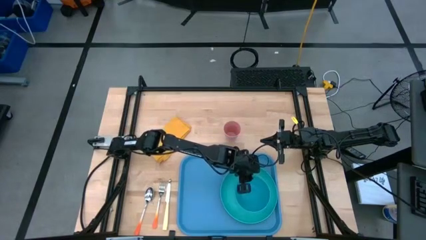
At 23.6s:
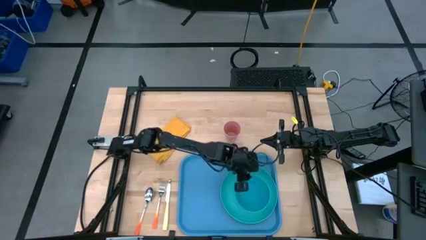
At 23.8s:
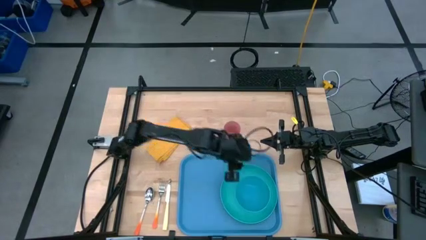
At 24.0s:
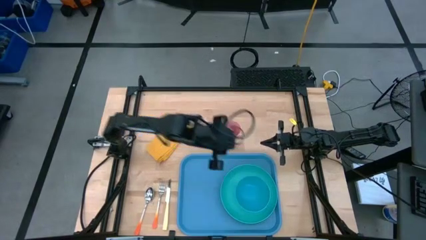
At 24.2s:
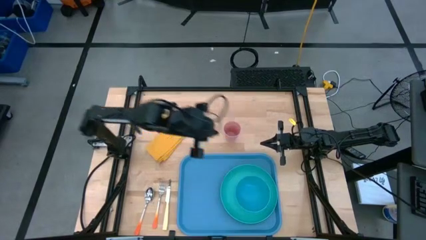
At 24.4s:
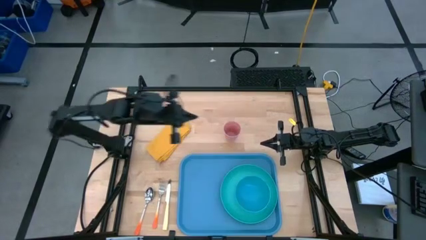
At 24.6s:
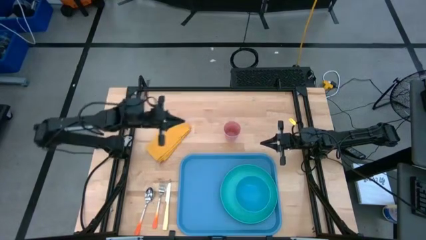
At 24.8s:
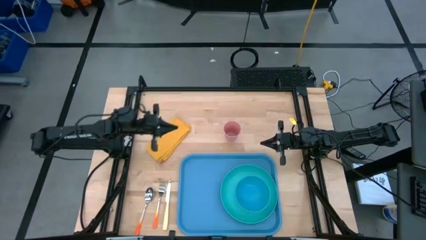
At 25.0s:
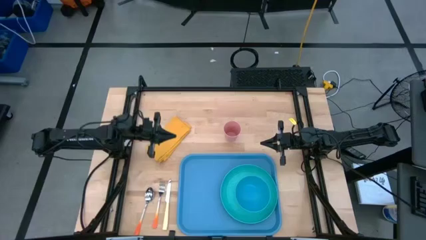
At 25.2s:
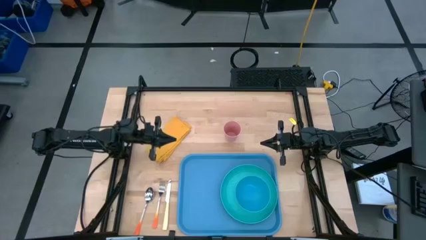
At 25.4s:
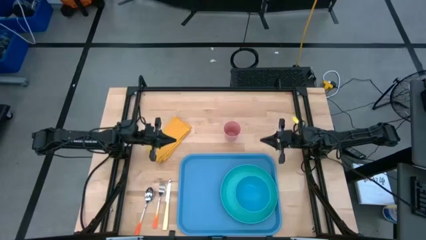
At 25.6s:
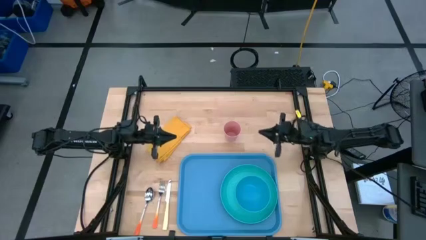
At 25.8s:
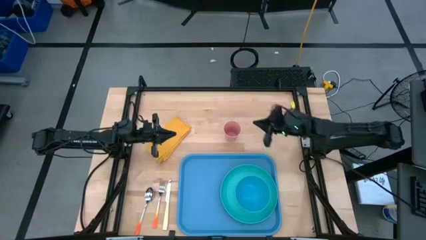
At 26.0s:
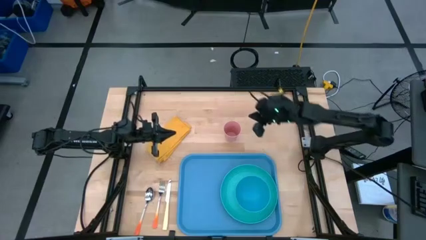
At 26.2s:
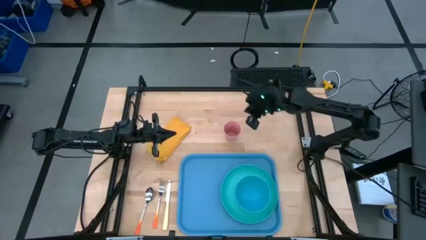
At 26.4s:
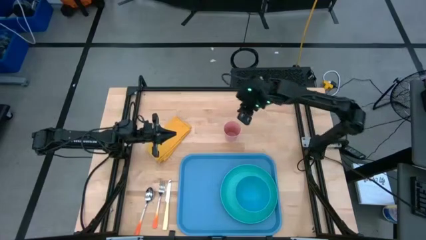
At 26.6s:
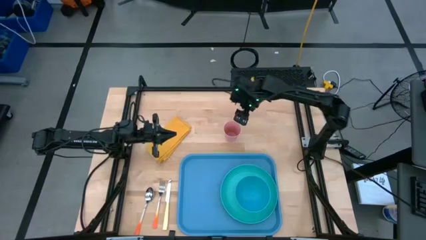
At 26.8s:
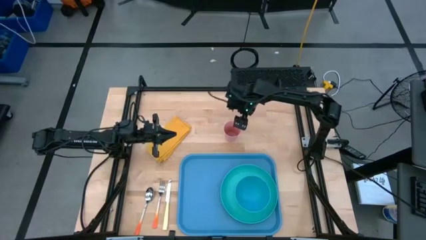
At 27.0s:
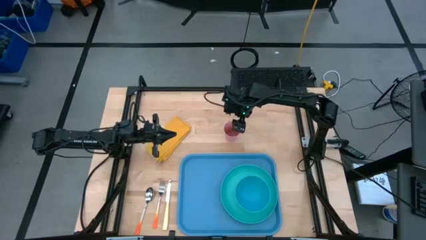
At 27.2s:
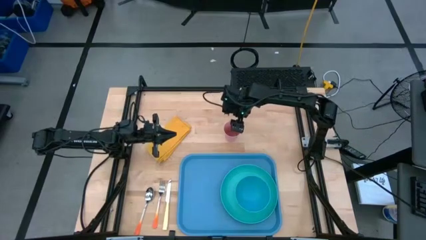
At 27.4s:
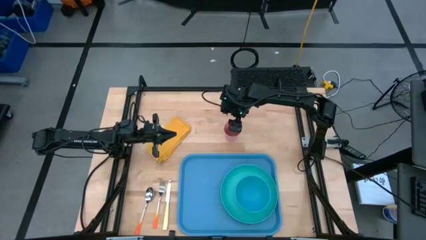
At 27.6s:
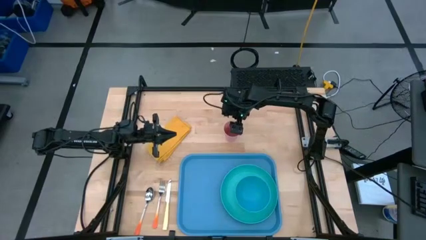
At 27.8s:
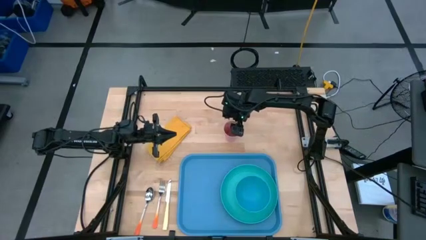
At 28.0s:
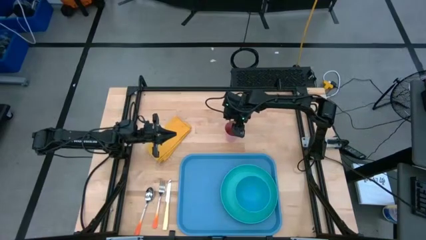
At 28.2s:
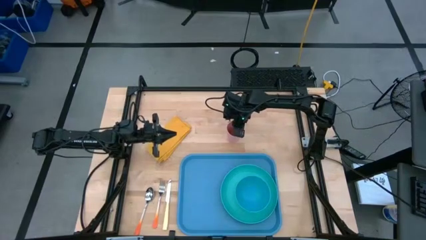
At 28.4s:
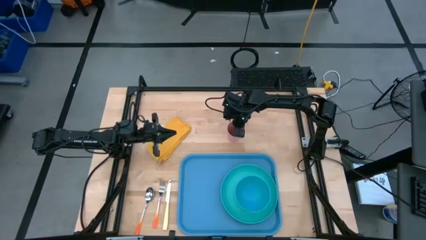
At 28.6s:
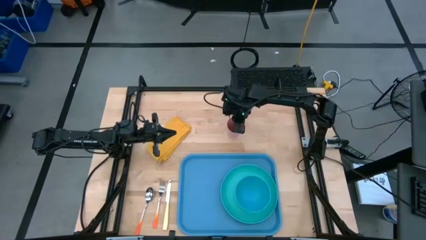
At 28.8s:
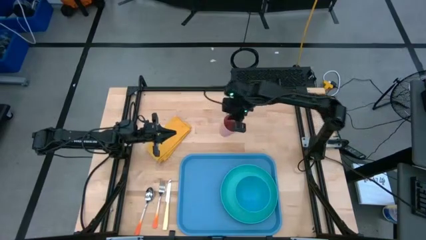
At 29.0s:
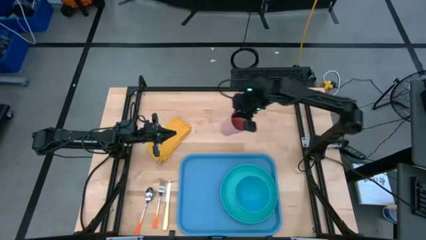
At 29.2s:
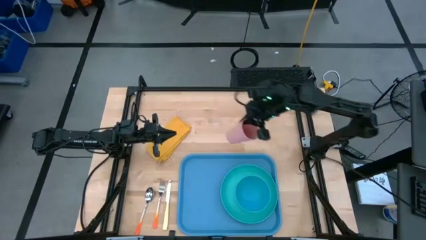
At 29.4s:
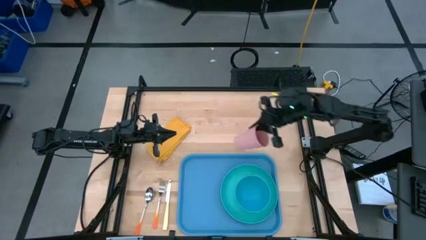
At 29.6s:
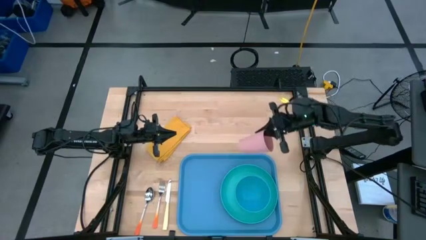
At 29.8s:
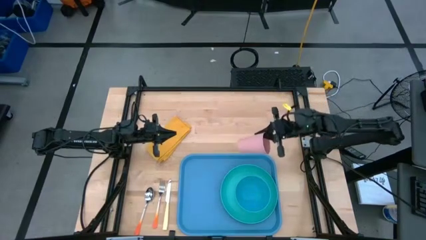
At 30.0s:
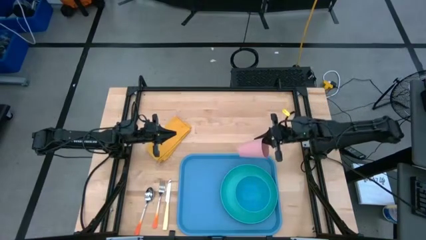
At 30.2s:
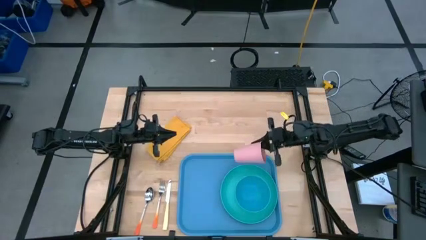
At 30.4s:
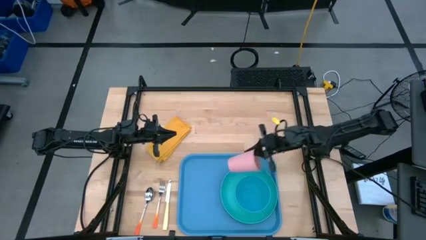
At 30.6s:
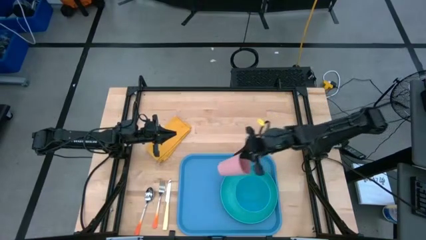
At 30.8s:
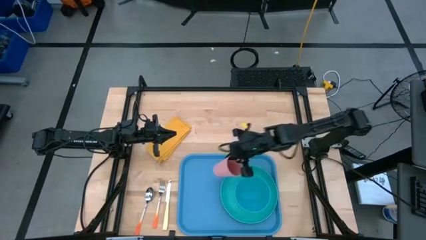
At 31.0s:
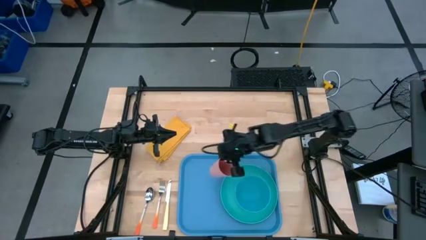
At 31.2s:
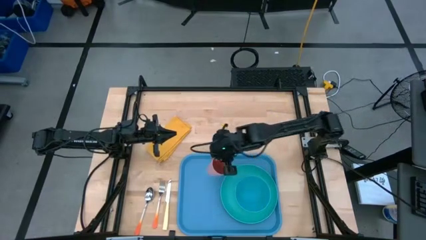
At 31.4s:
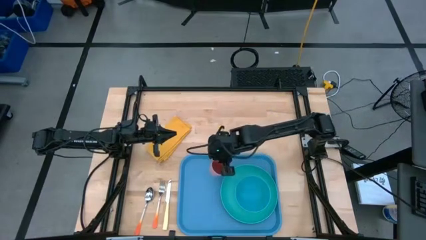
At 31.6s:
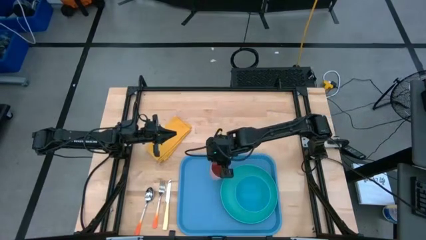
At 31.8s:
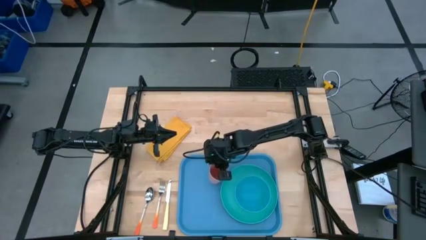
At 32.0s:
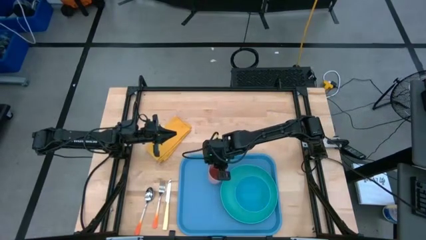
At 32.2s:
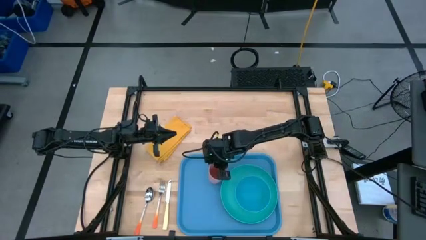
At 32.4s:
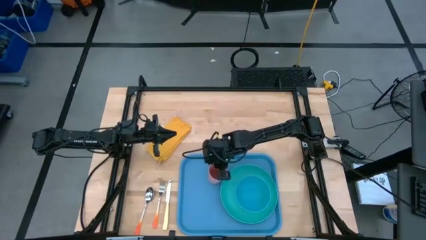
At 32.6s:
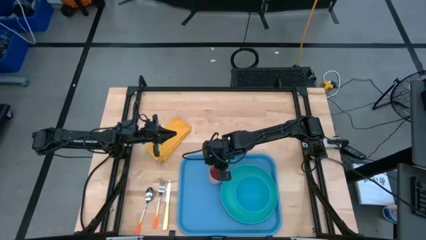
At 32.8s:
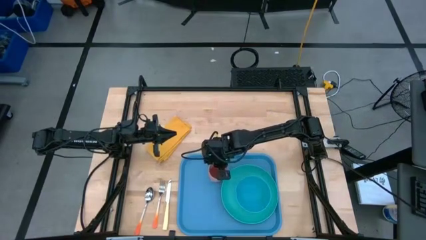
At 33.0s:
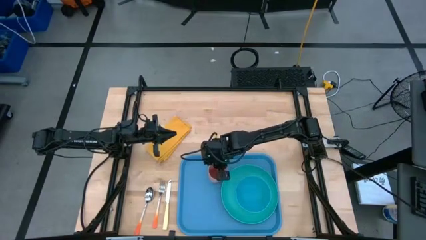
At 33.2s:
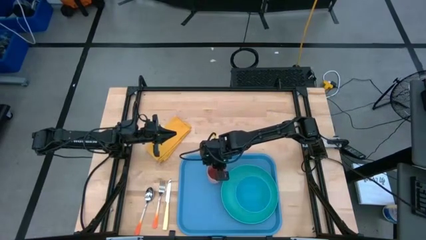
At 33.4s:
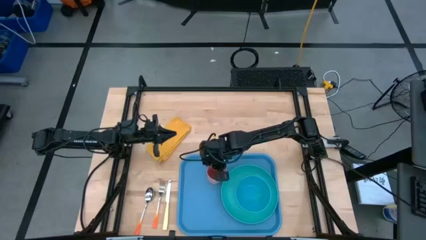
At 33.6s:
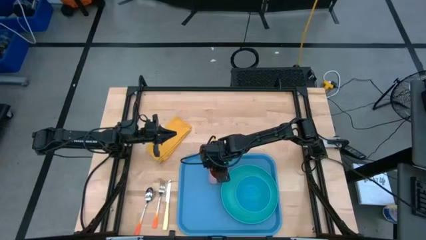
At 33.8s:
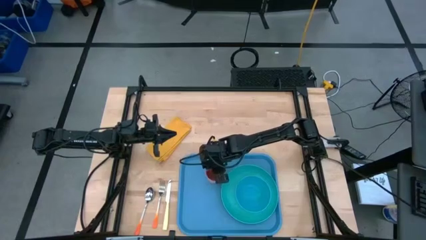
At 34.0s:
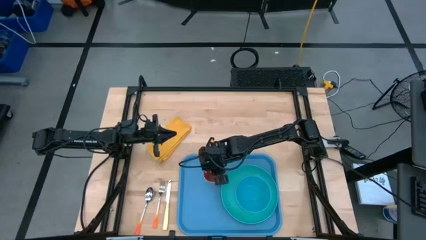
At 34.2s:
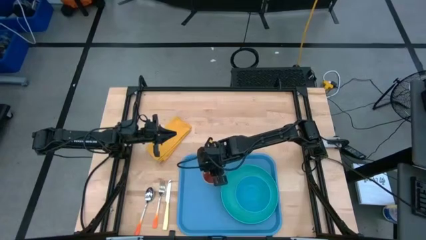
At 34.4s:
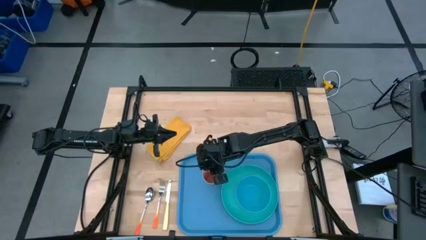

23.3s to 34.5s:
Task: Set up tray
Put the pink cup on the blue serving tray to the top left of the green plate

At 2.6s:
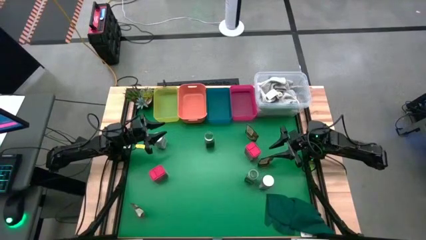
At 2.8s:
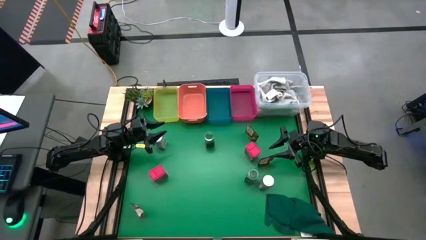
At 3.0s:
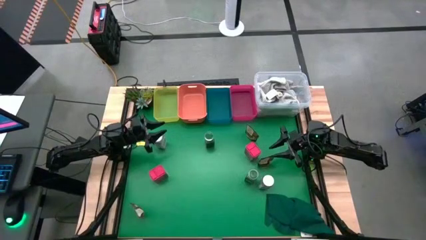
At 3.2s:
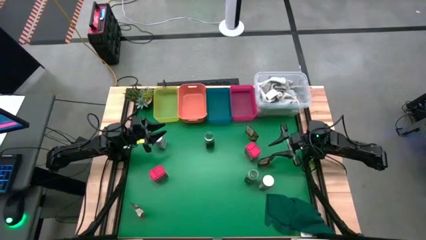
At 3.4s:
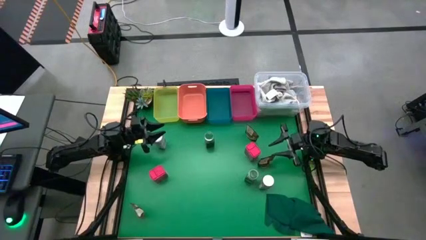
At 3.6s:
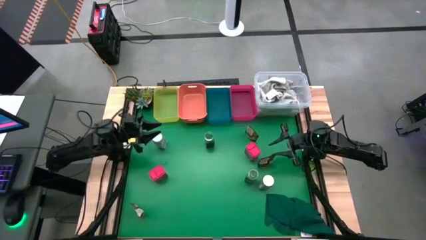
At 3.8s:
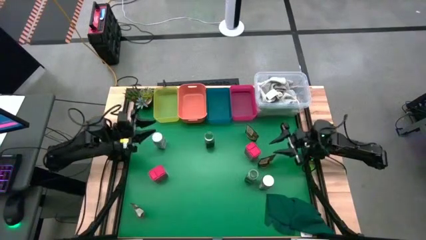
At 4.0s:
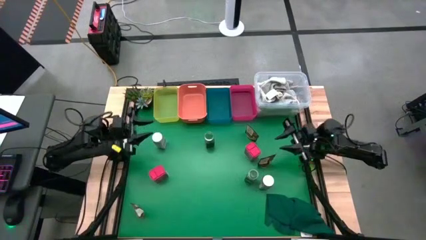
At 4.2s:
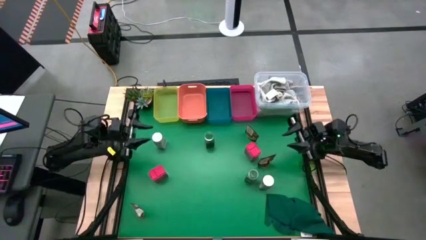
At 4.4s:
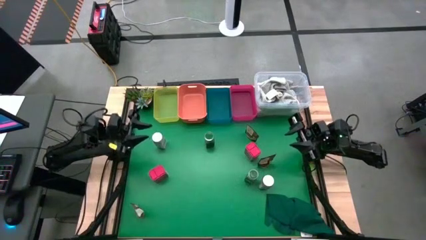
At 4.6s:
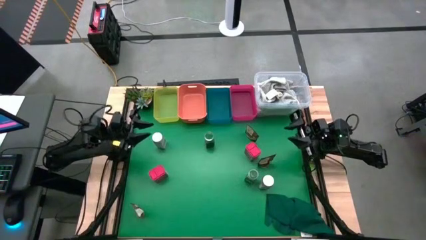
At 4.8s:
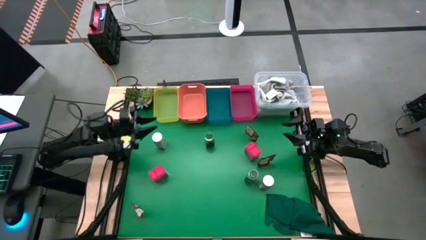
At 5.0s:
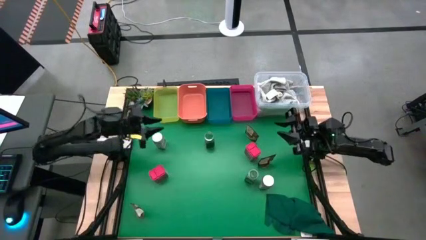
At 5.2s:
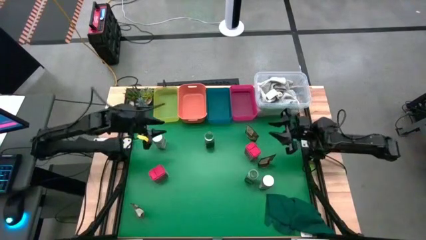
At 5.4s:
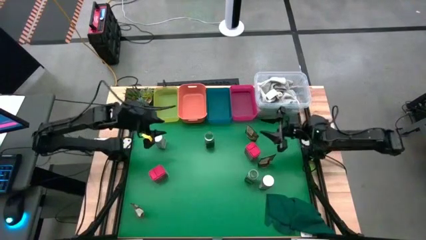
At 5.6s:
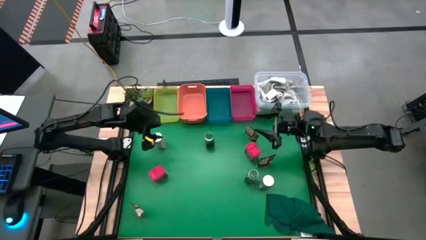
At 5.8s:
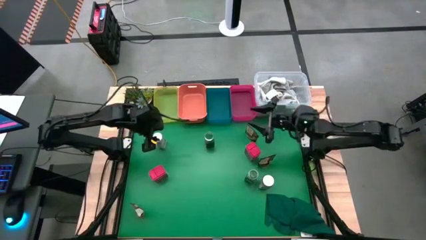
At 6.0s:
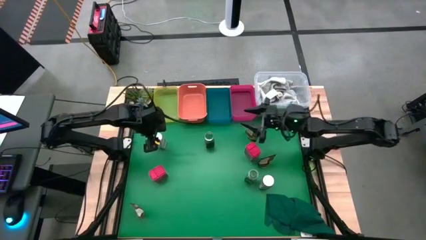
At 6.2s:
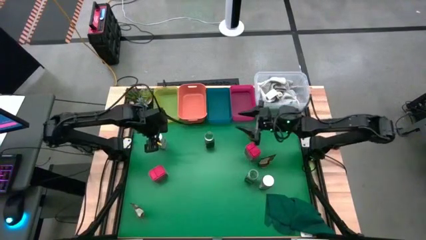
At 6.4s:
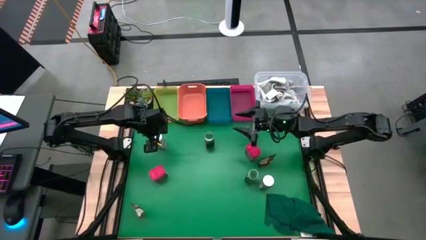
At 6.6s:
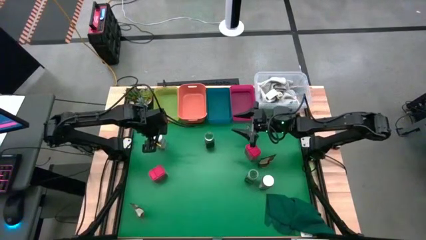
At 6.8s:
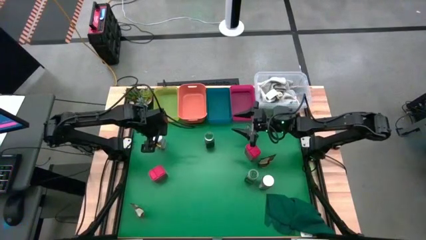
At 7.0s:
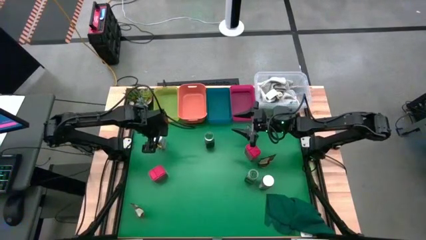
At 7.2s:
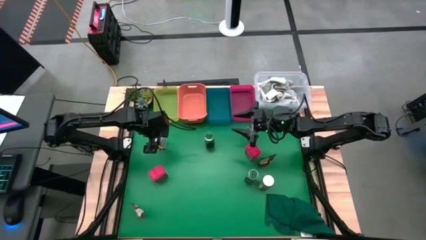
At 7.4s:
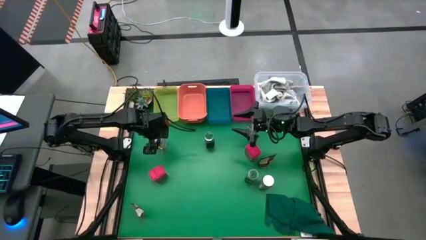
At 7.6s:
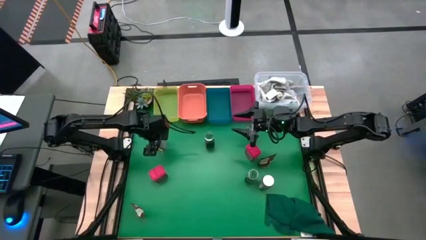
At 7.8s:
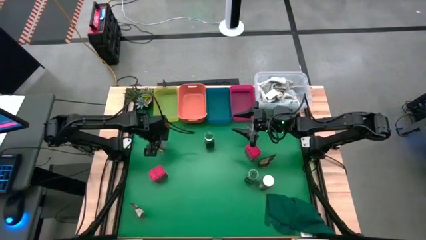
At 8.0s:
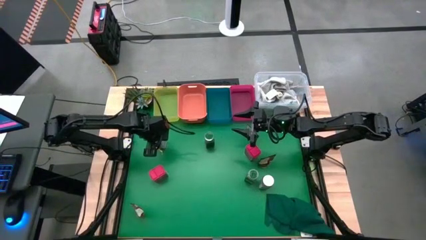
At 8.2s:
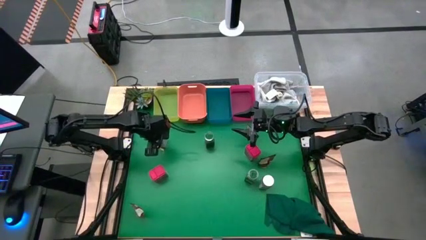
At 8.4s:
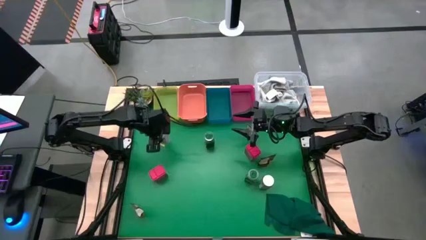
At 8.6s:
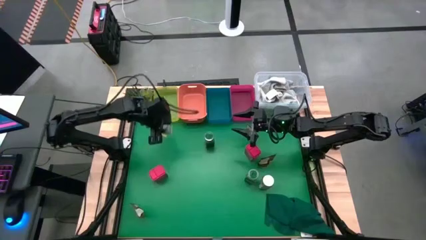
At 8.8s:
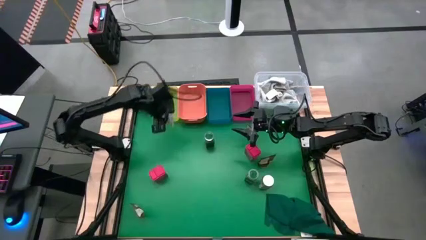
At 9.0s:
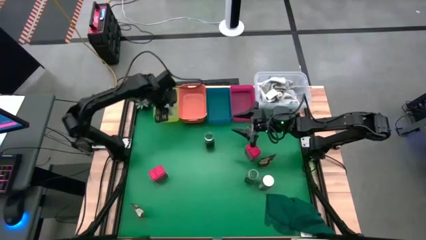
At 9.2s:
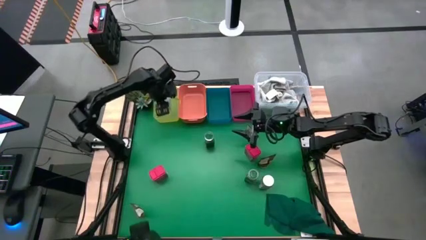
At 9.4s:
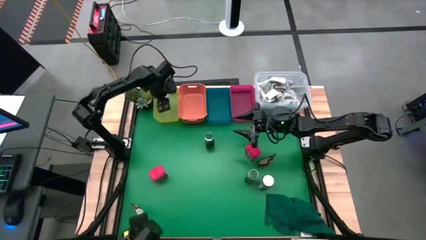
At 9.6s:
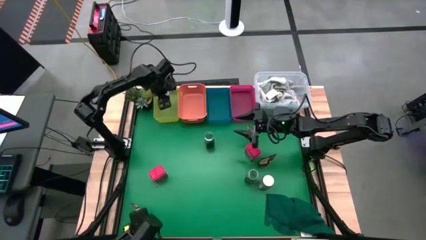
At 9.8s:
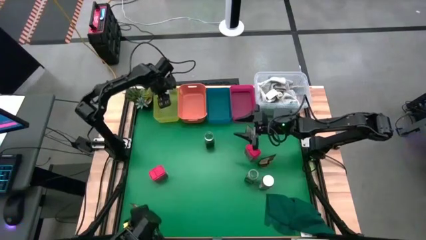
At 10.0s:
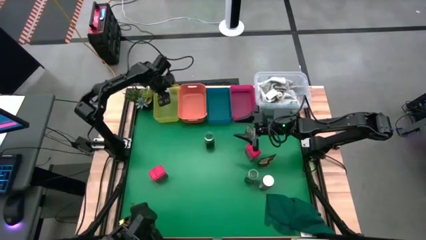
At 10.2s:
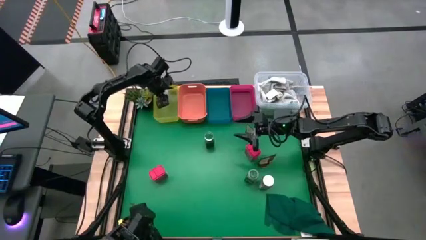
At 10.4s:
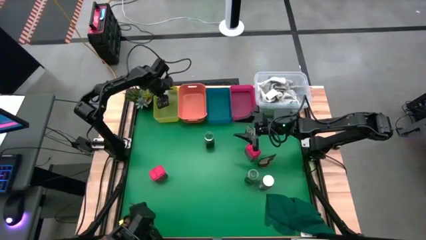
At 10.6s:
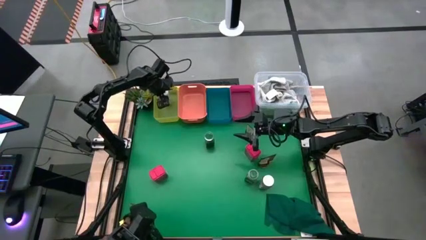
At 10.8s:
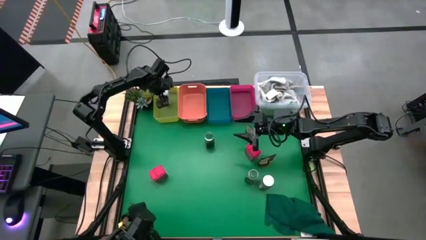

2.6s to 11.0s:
Task: Sort spices by type
Put the left white seasoning bottle into the yellow bin
